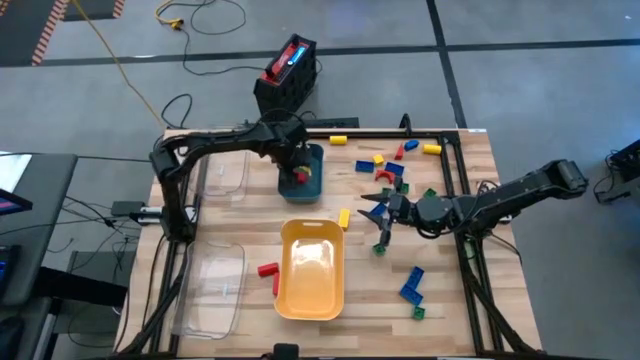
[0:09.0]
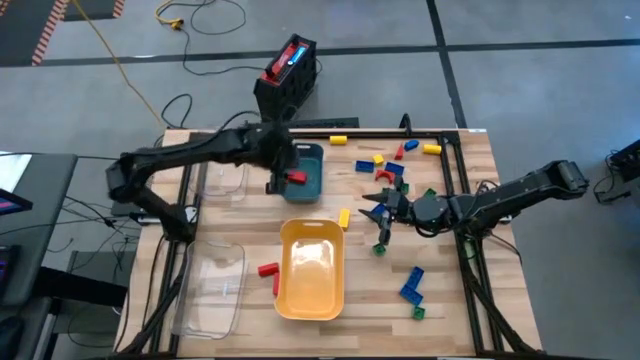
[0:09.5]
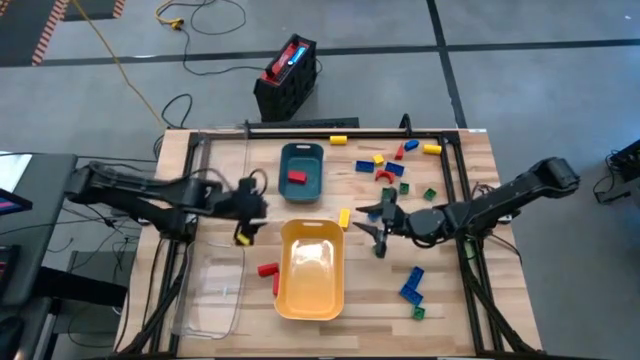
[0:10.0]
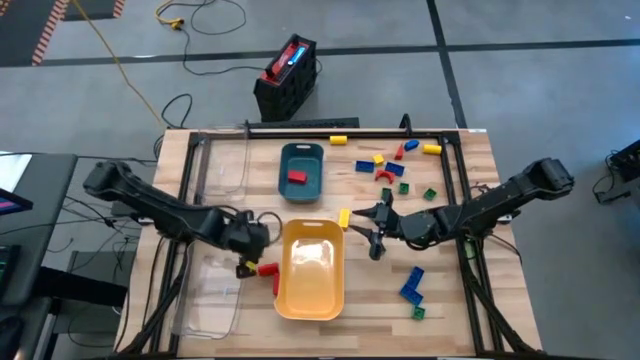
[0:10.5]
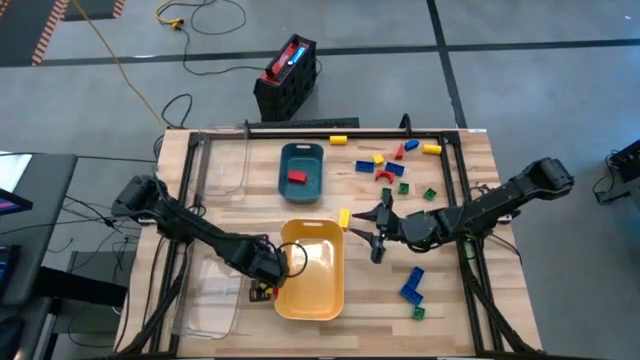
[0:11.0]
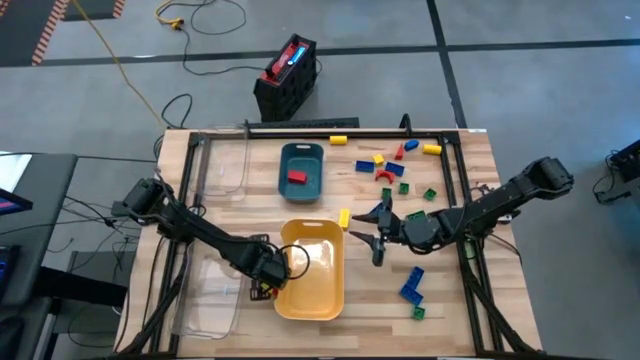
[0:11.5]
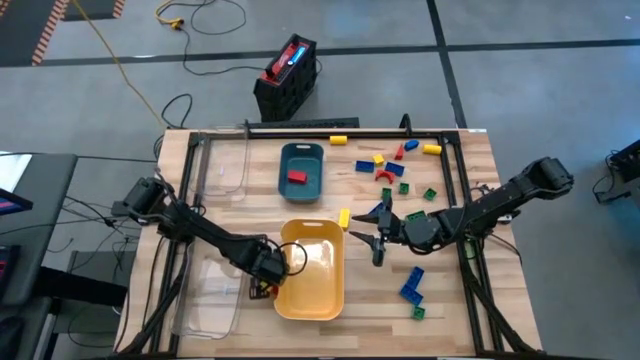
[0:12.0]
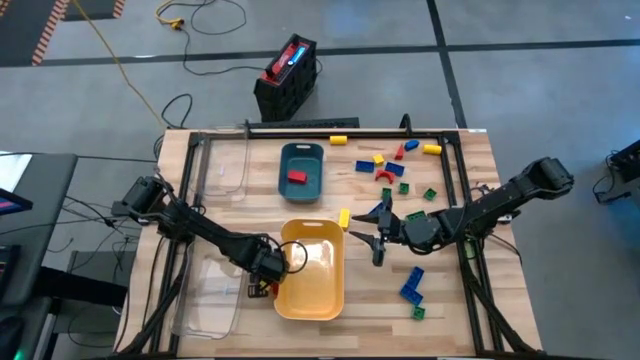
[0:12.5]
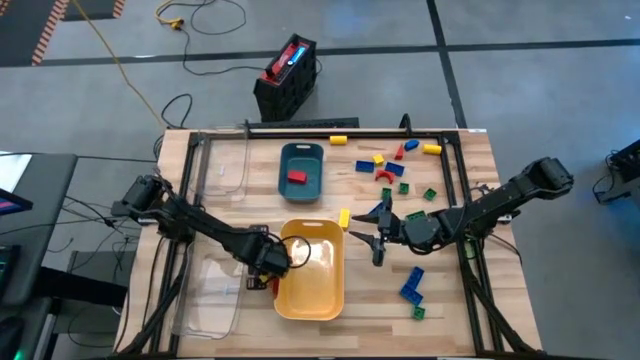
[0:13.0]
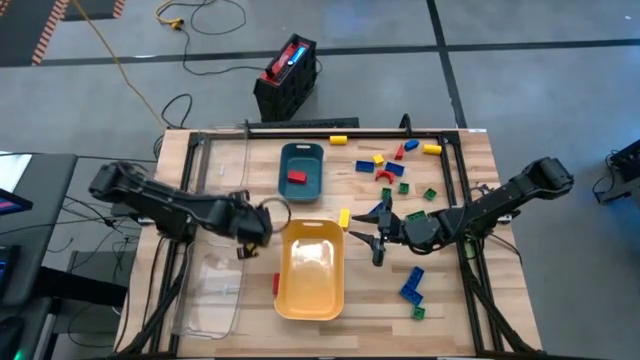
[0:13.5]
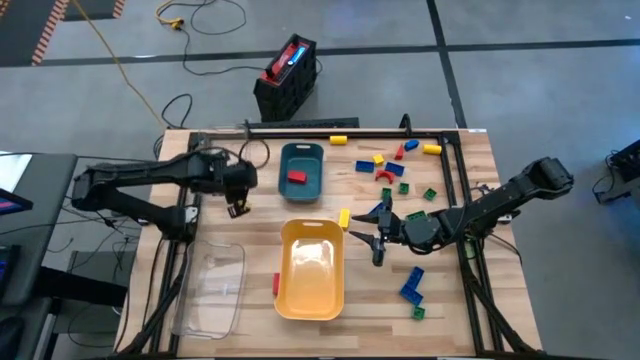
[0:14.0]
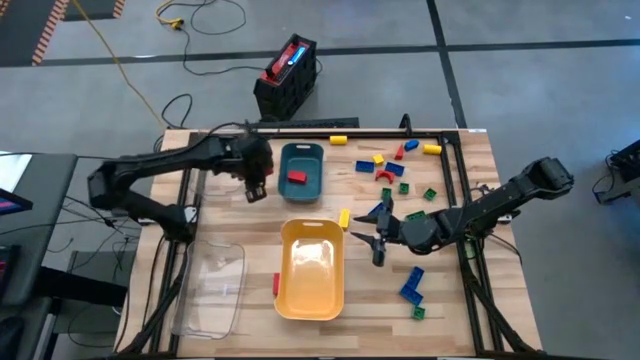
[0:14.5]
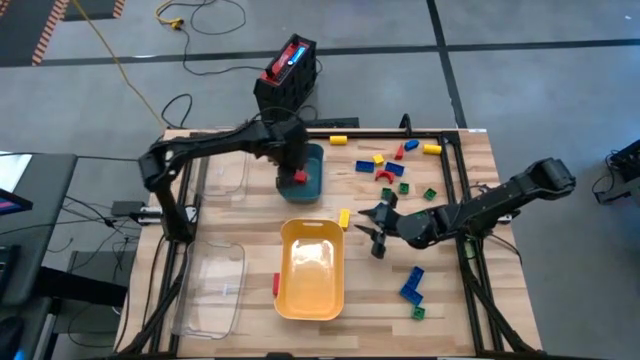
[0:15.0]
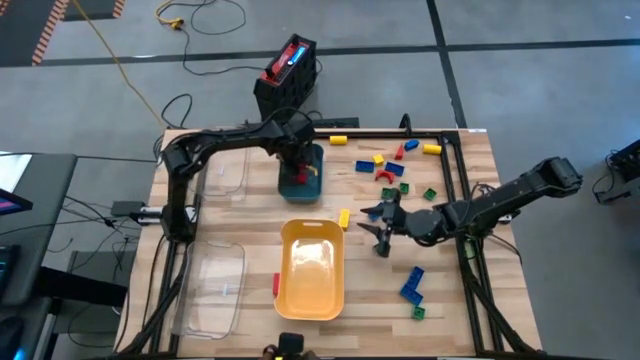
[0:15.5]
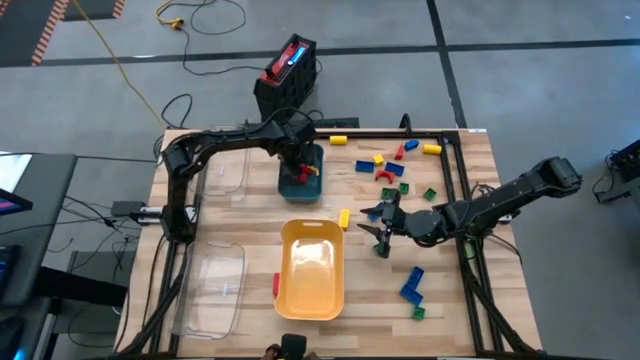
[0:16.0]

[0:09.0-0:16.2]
Task: Sort blocks
Put the circular red wooden block into the blue bin

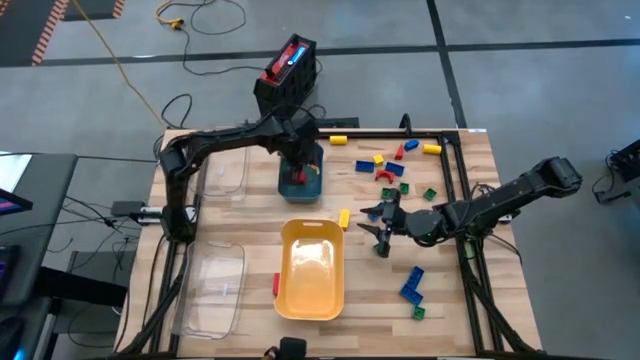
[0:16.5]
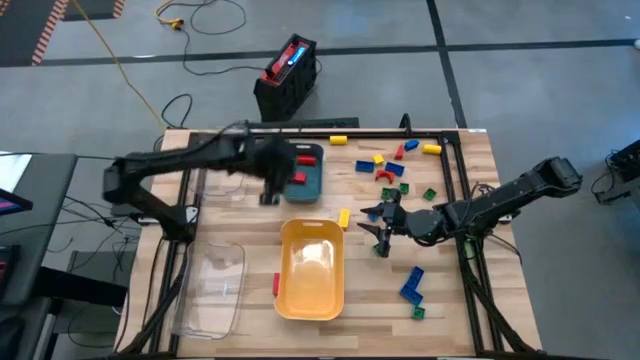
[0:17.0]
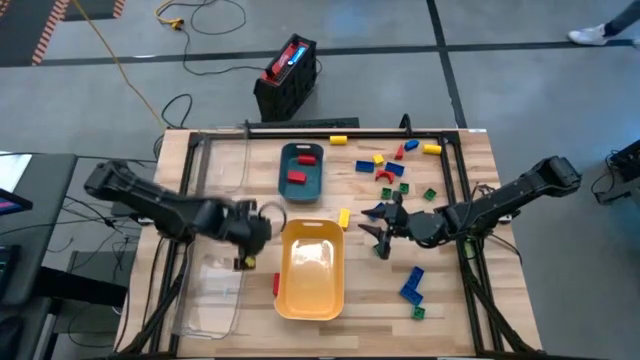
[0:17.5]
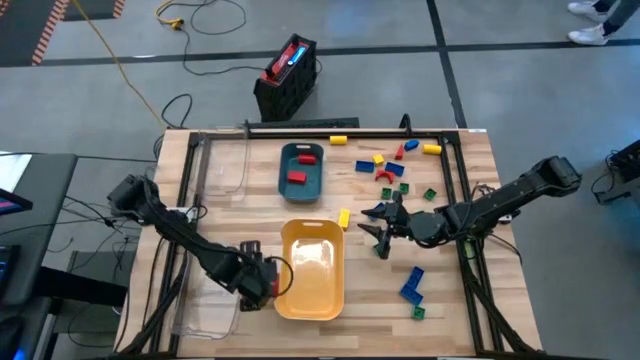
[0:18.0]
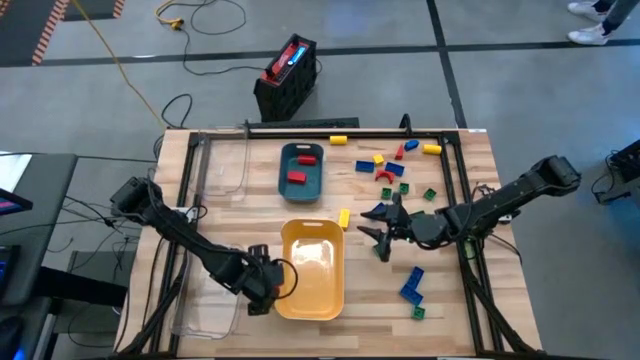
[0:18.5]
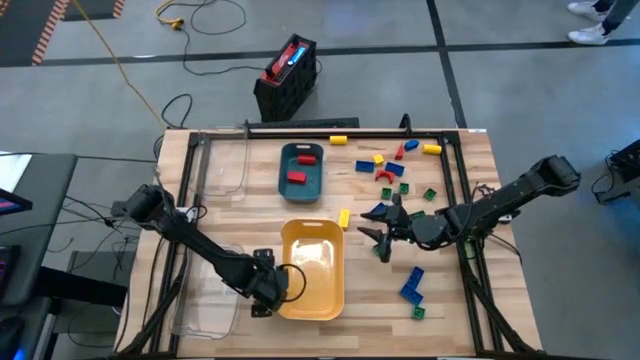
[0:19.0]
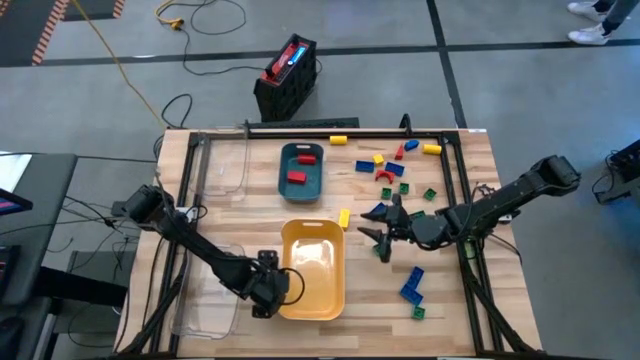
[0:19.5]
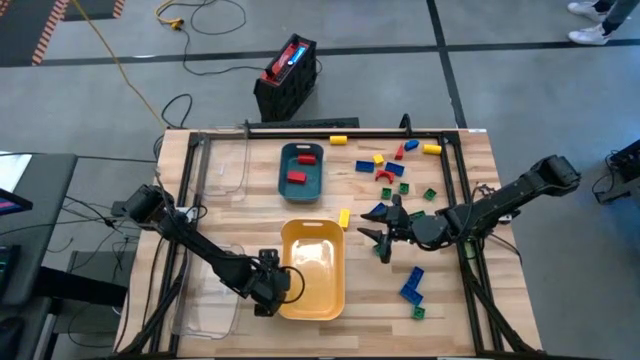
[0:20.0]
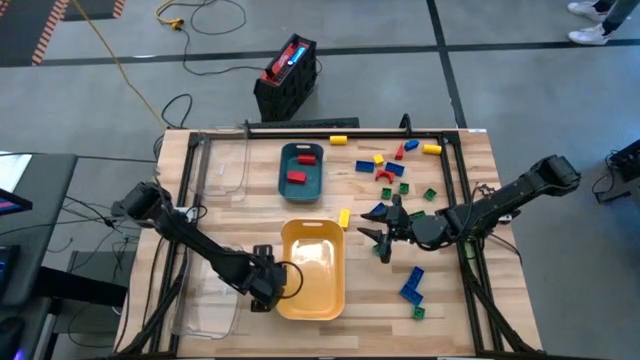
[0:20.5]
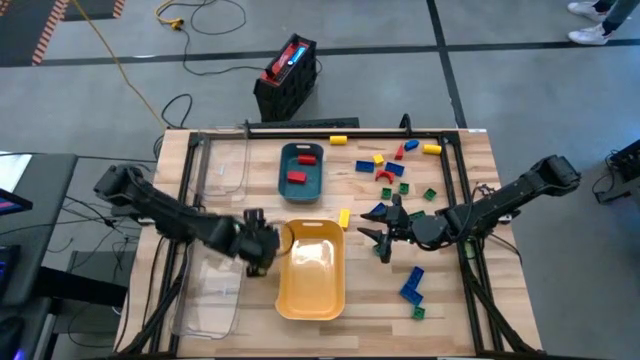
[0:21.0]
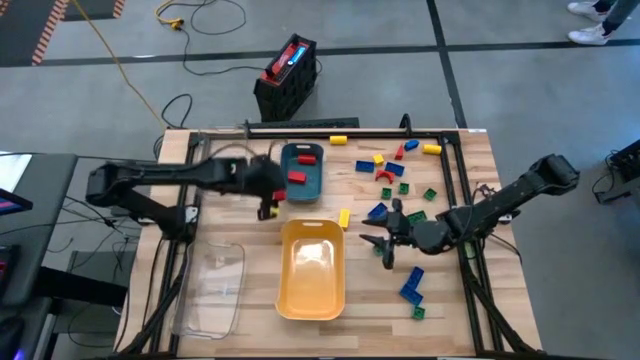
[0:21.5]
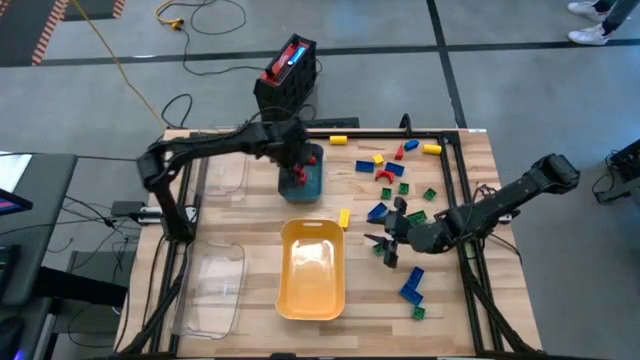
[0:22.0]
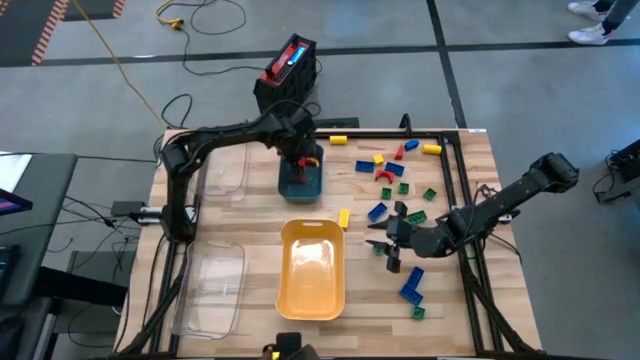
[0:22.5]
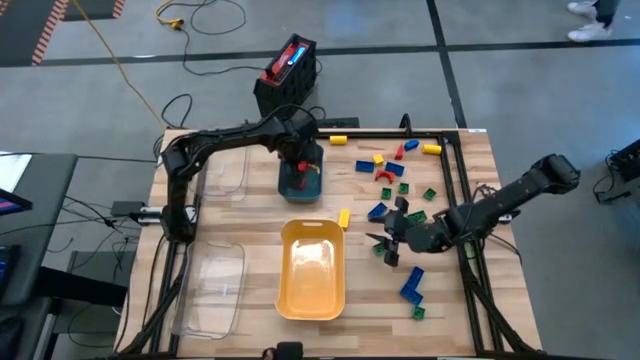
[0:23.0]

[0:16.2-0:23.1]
Put the rectangular red wooden block into the blue bin

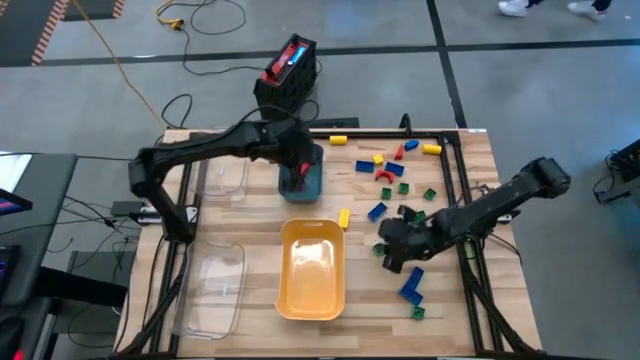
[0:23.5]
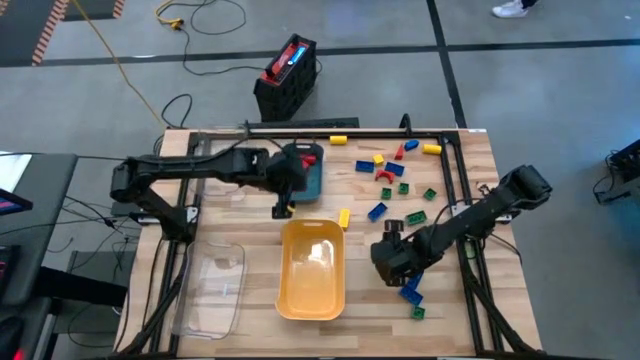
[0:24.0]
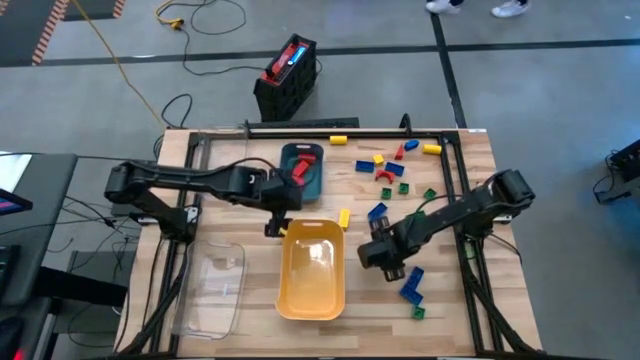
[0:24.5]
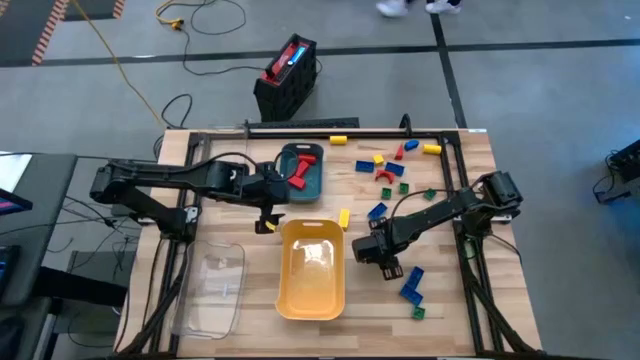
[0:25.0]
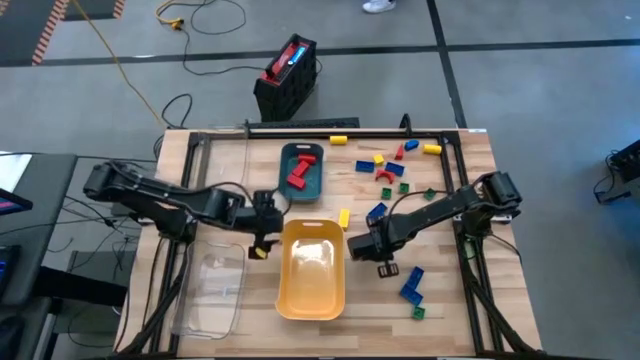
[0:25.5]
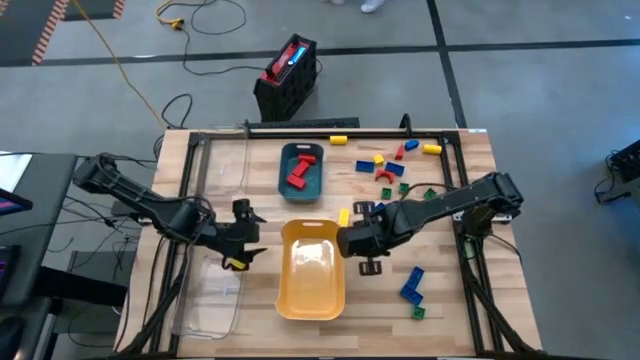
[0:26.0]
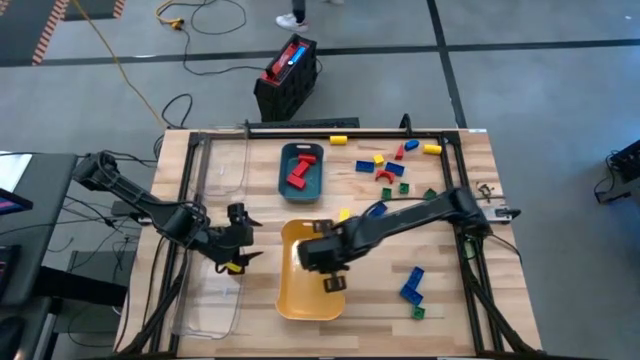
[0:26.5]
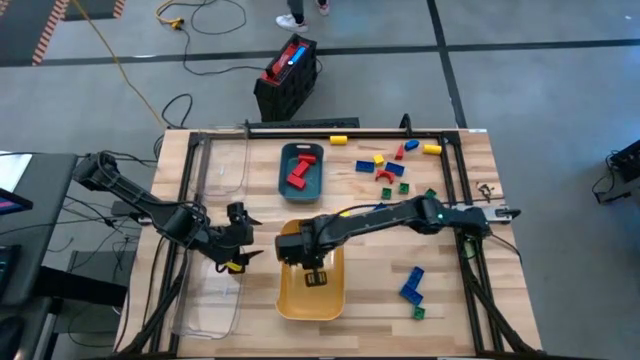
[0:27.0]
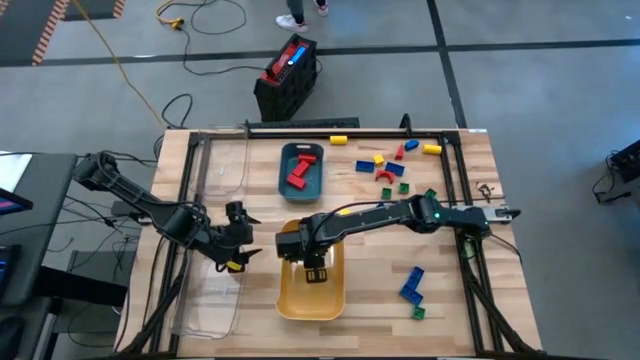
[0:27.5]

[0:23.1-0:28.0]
Put the square green game piece into the yellow bin
